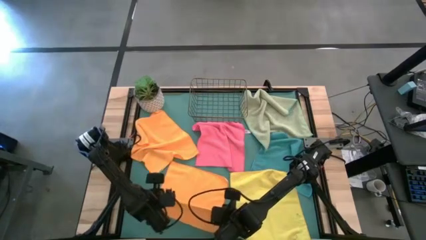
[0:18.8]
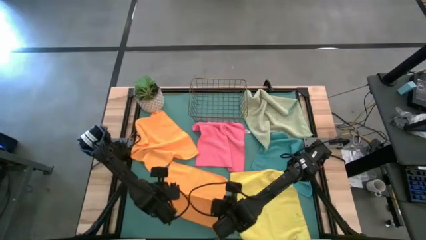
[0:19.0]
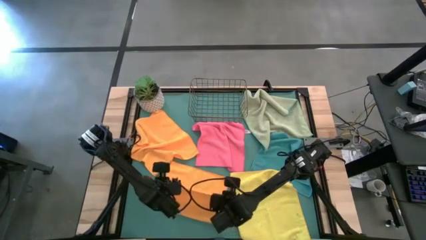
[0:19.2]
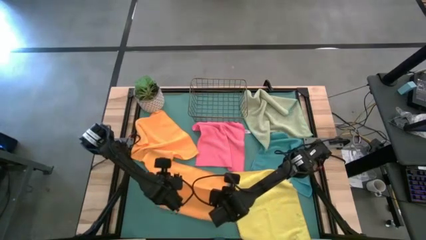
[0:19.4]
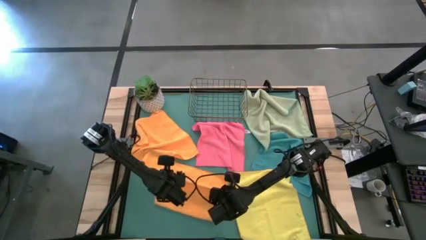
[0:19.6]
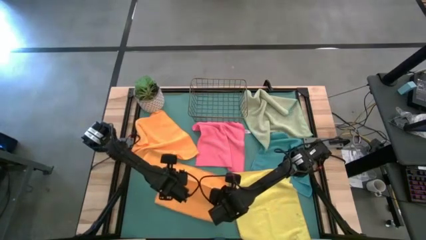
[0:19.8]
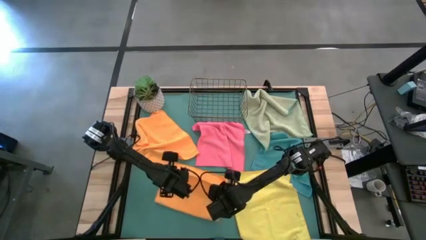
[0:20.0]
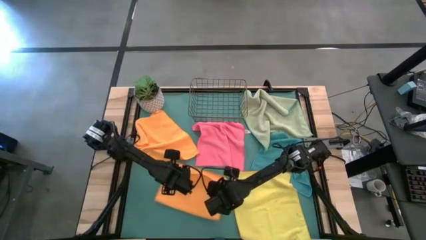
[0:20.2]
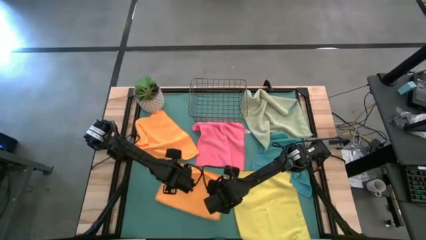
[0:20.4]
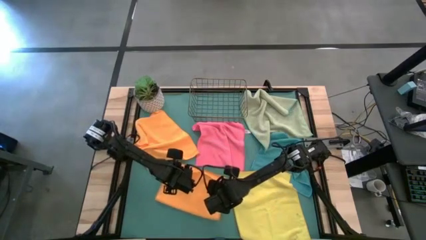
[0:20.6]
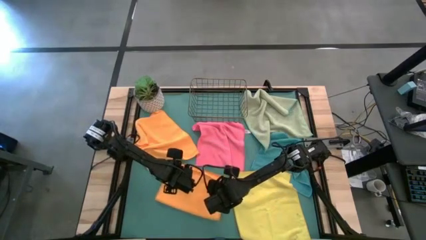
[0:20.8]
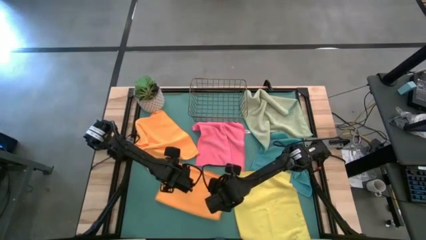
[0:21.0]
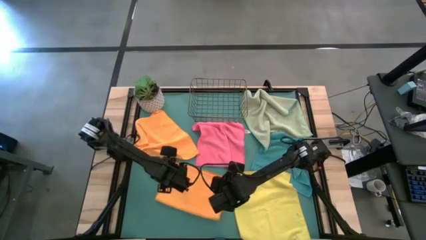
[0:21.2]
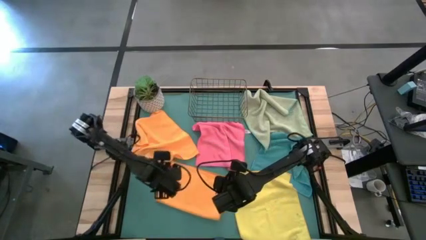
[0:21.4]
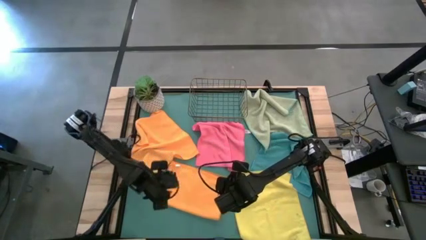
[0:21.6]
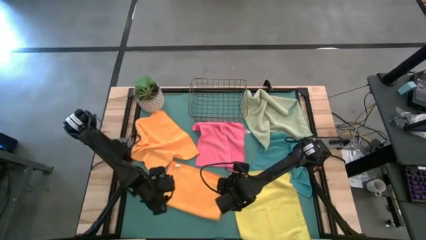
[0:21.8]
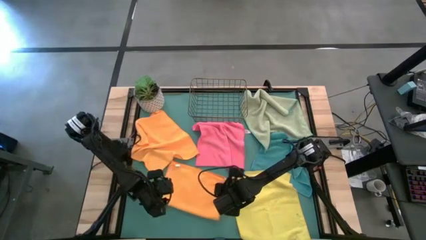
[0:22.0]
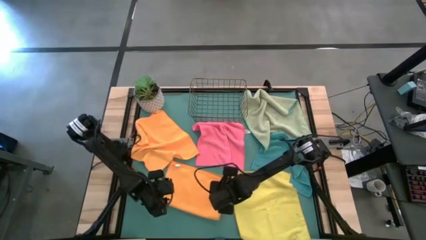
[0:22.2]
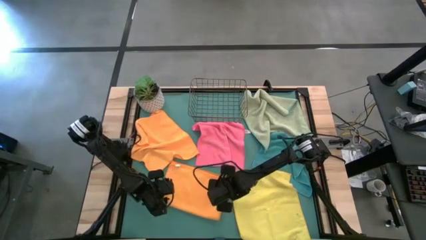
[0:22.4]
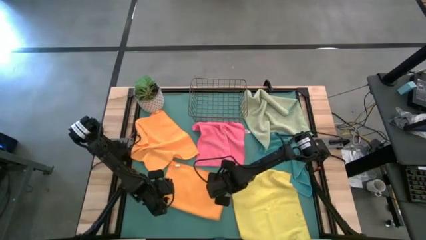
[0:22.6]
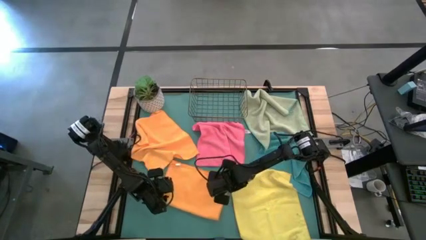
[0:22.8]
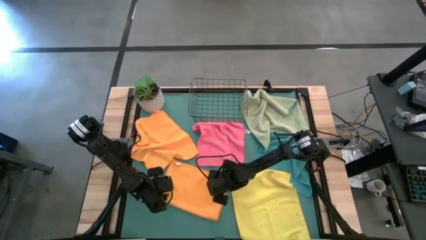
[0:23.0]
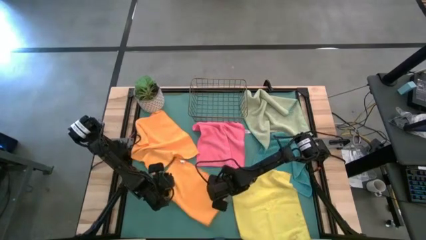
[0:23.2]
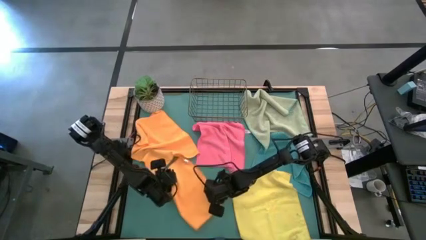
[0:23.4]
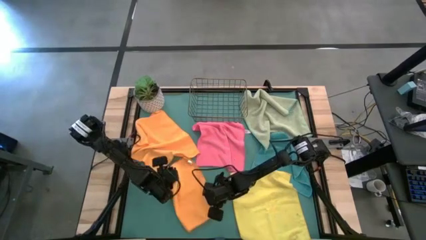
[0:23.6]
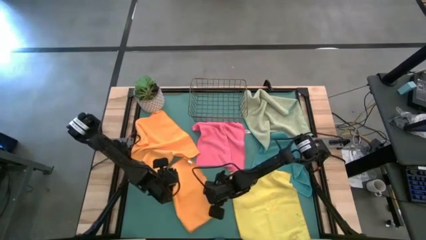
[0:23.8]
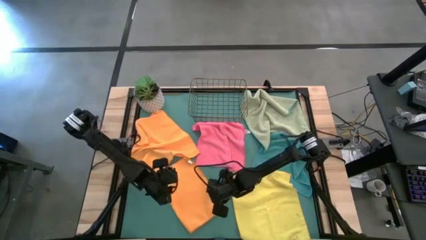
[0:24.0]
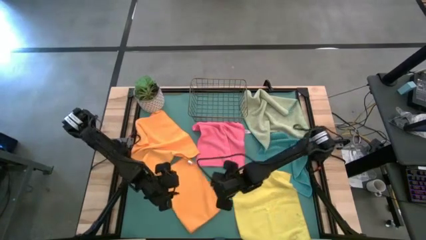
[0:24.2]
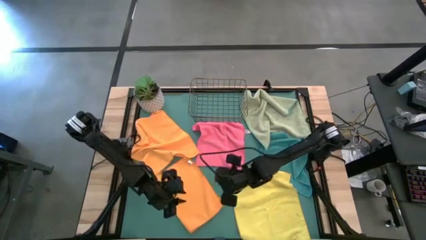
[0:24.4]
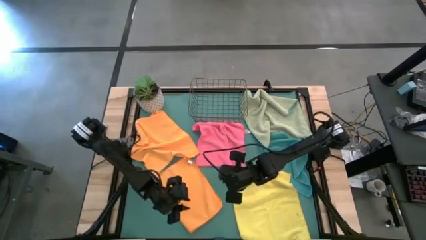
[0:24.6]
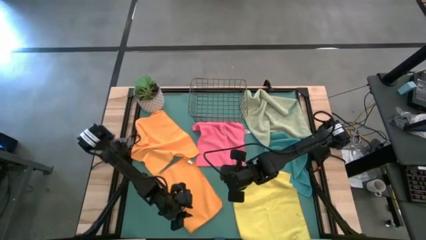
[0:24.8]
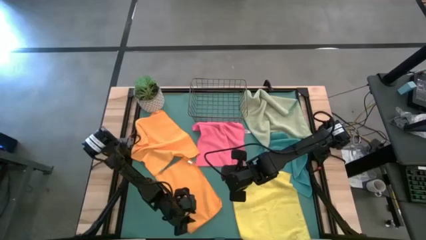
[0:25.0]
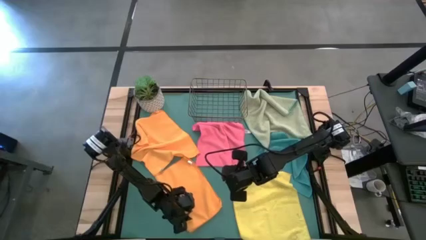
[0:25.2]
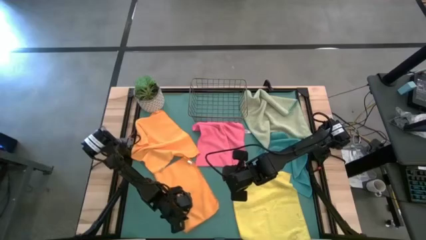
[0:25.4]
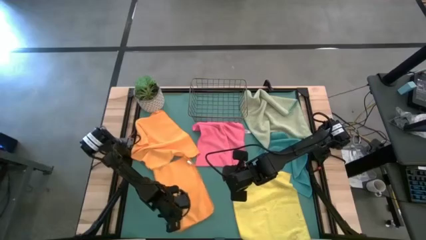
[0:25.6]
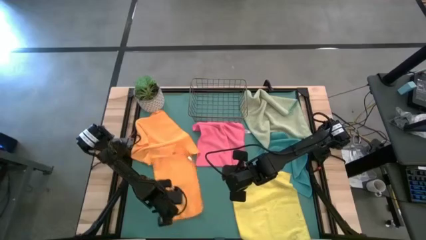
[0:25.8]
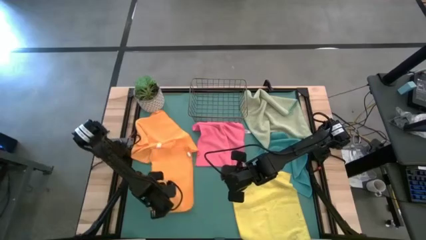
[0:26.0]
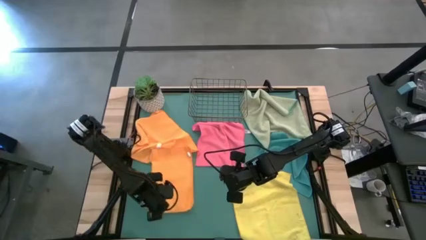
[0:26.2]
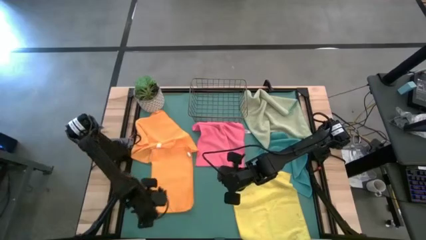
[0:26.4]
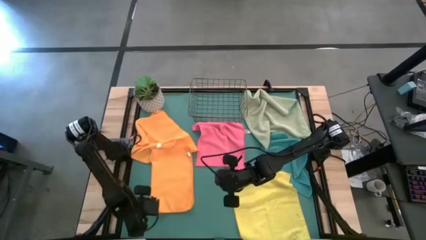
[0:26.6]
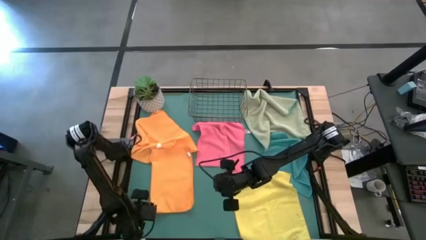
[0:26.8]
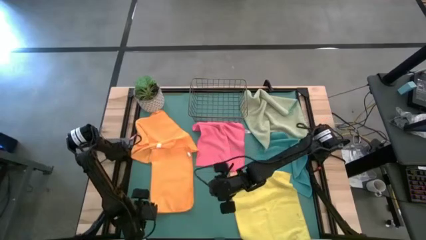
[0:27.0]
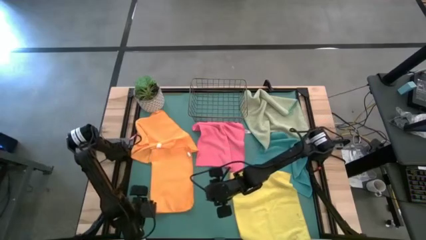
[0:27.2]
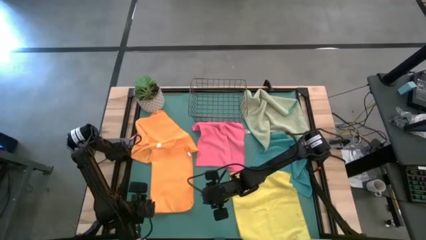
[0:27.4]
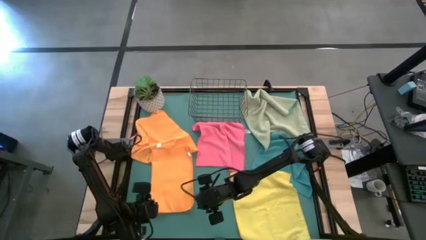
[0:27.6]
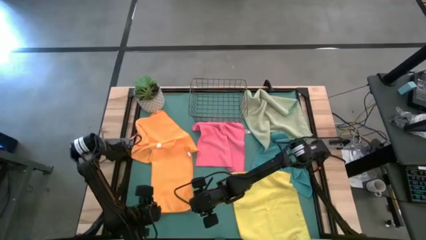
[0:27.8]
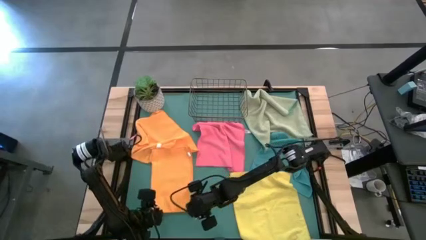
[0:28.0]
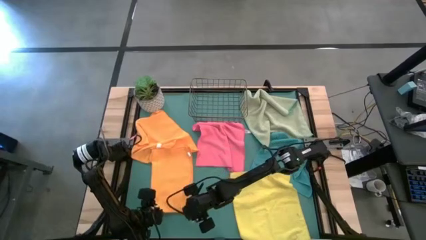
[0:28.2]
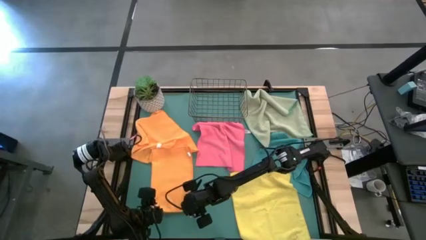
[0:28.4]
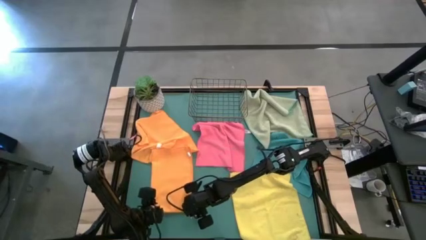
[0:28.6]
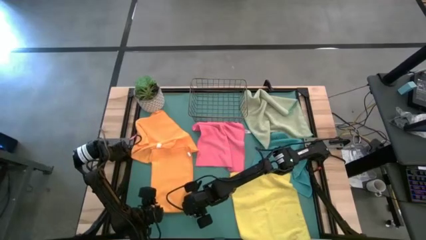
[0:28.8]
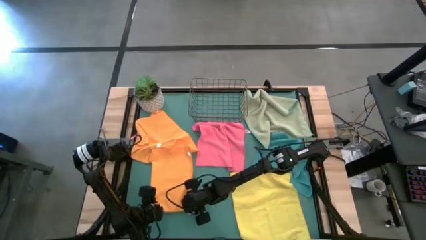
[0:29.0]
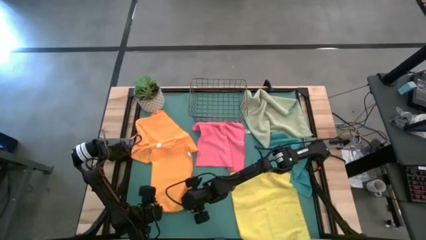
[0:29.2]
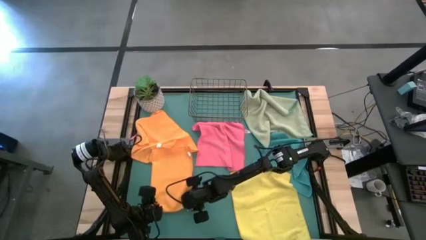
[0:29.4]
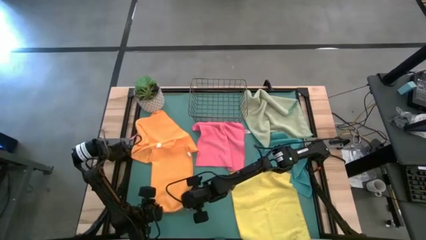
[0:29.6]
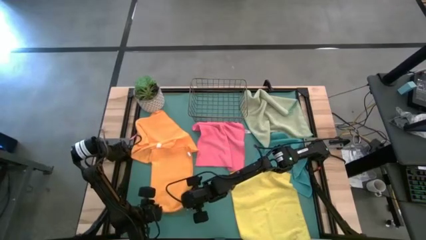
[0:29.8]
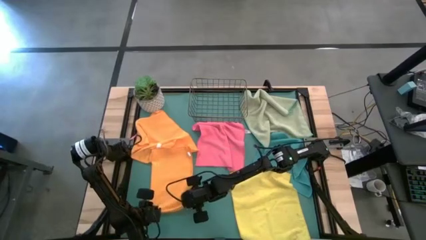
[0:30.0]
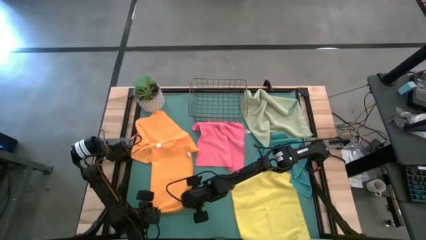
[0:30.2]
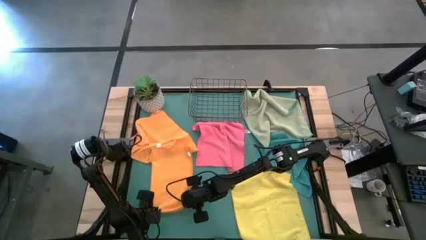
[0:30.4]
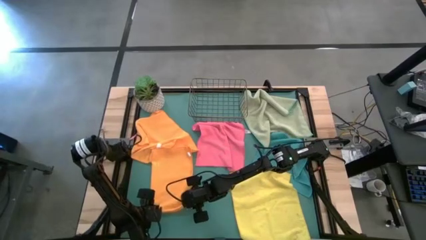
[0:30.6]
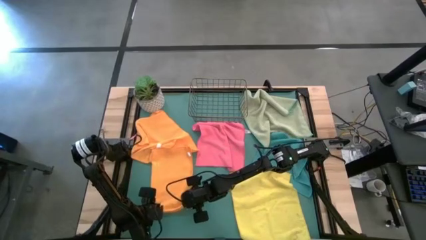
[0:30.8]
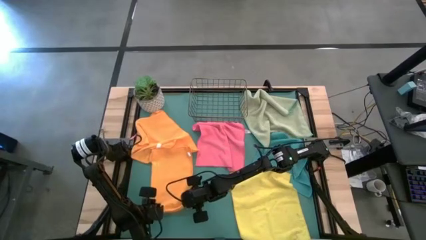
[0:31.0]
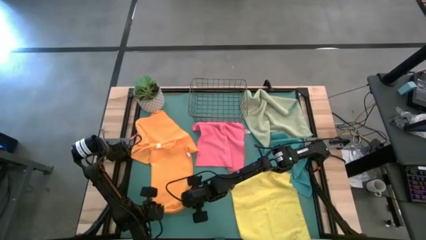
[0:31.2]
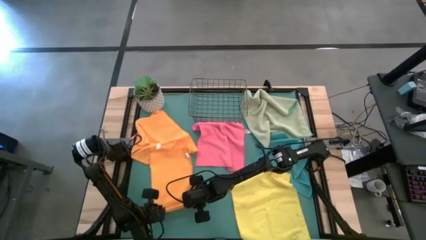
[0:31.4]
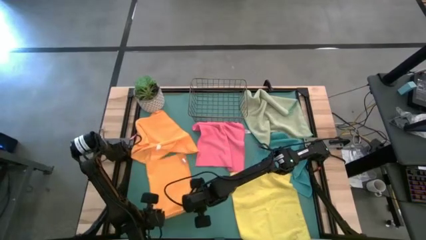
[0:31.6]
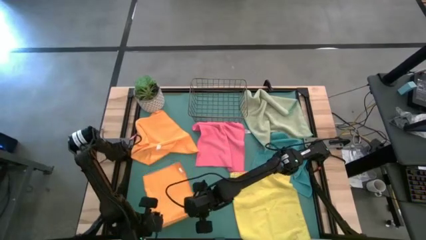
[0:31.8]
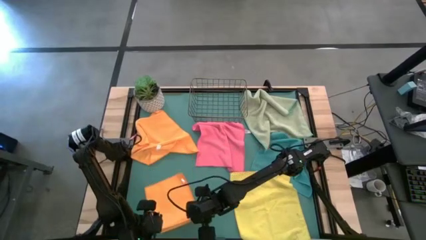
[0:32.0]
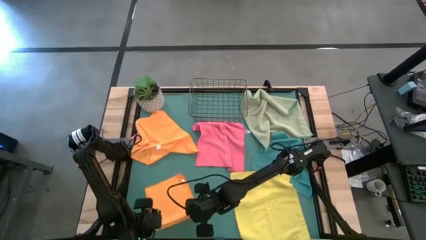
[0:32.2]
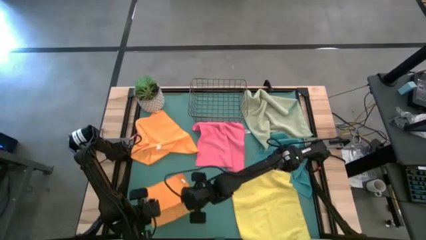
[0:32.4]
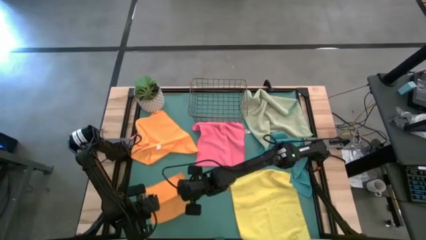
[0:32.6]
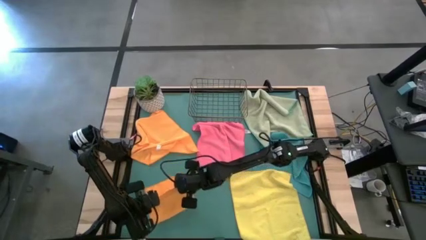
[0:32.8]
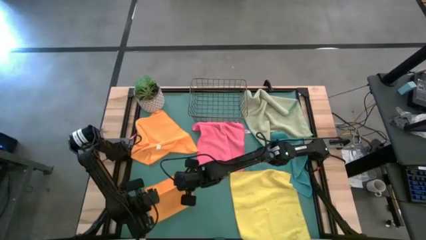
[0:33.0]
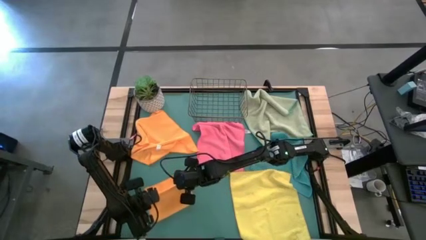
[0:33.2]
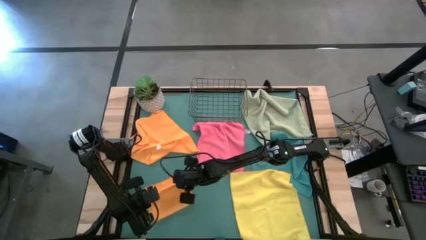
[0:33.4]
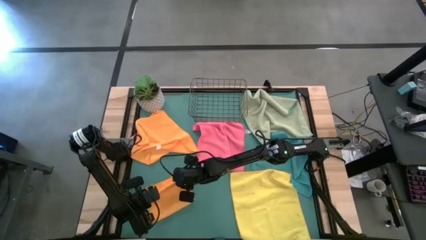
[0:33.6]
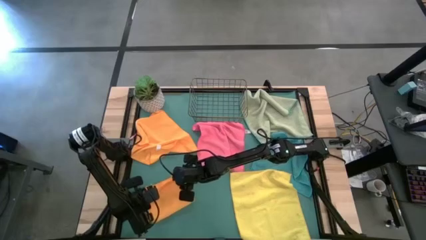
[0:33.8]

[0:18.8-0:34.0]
Task: Fold microfiber towels
Fold the bottom orange microfiber towel
